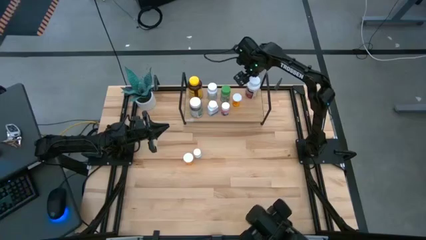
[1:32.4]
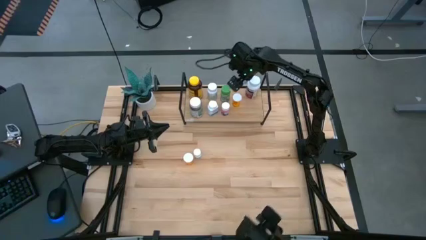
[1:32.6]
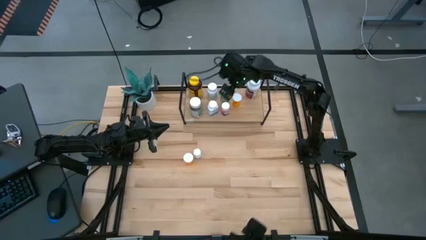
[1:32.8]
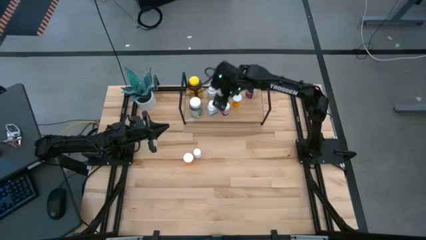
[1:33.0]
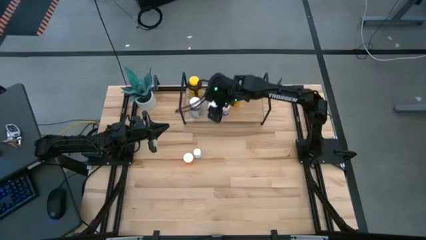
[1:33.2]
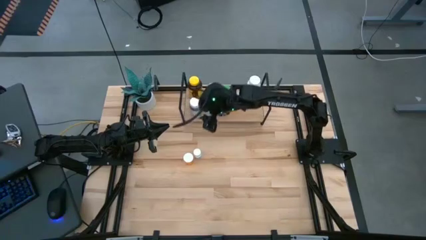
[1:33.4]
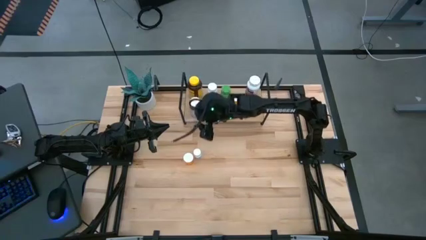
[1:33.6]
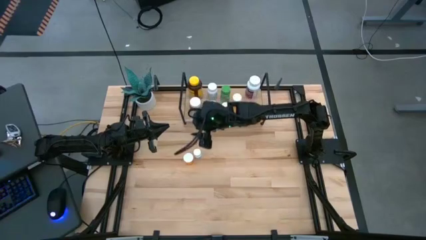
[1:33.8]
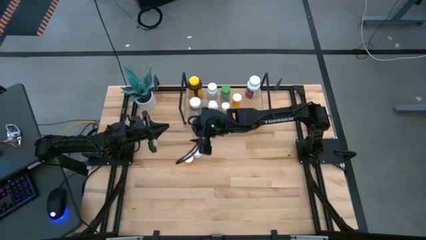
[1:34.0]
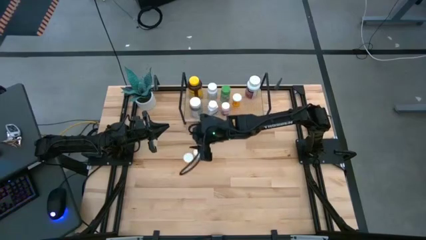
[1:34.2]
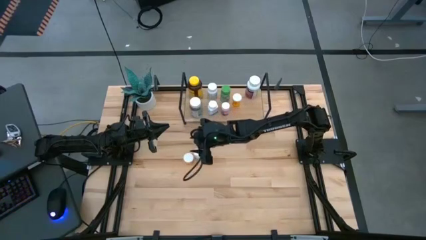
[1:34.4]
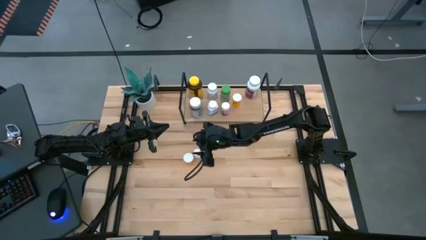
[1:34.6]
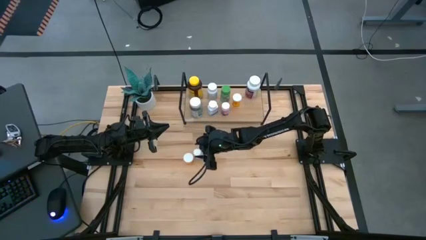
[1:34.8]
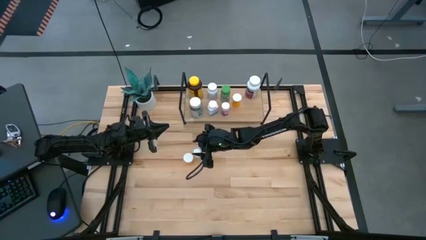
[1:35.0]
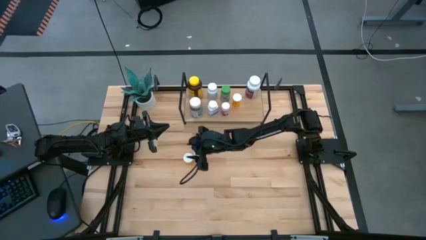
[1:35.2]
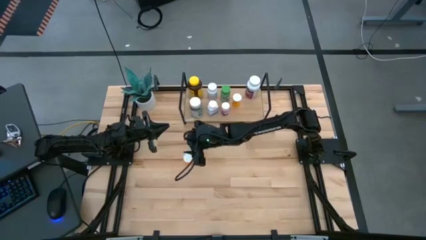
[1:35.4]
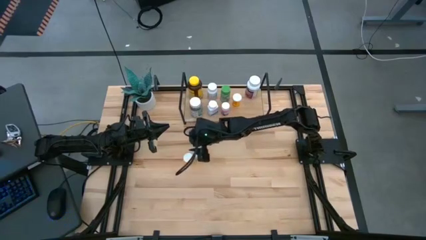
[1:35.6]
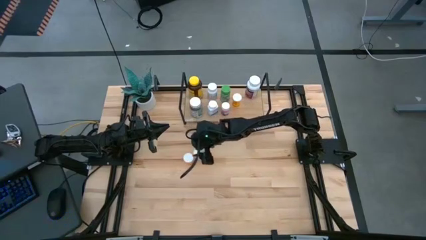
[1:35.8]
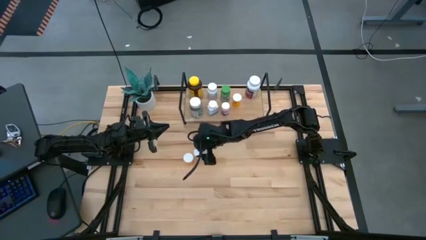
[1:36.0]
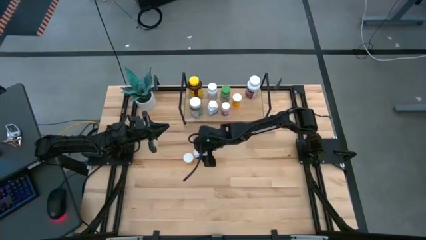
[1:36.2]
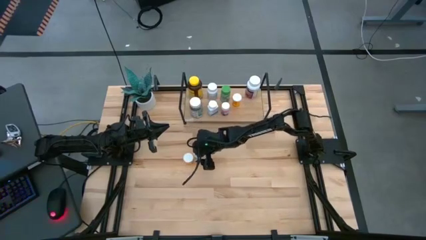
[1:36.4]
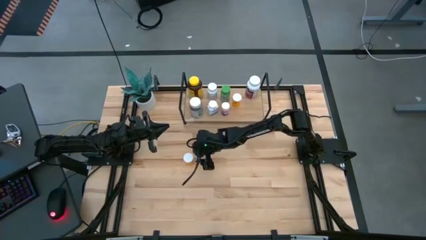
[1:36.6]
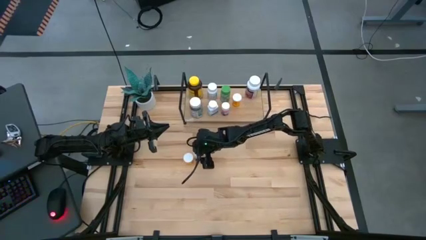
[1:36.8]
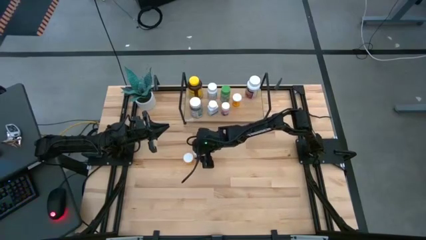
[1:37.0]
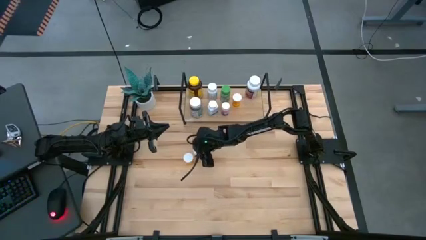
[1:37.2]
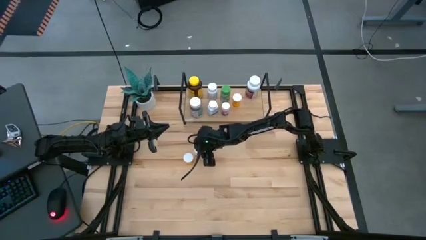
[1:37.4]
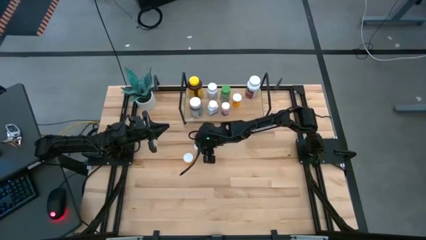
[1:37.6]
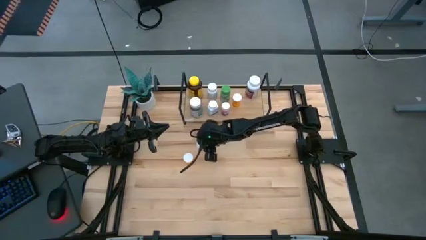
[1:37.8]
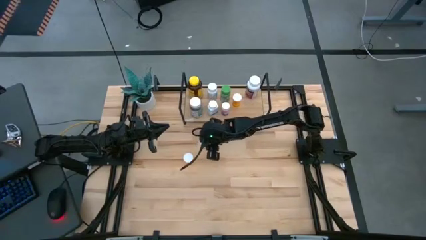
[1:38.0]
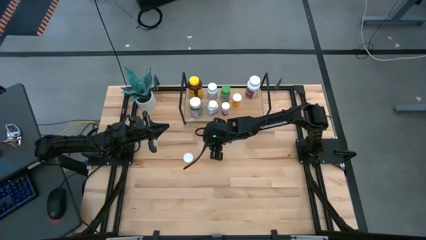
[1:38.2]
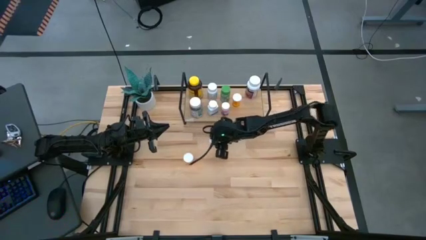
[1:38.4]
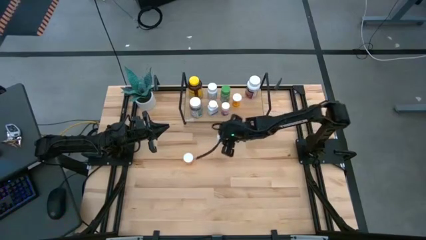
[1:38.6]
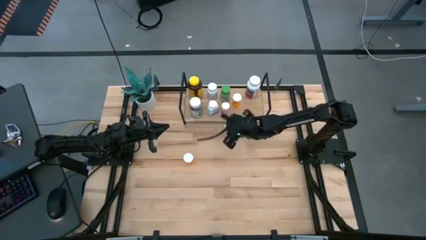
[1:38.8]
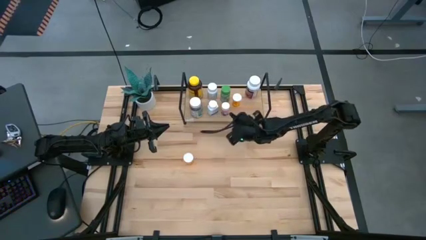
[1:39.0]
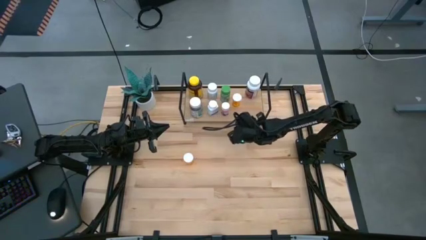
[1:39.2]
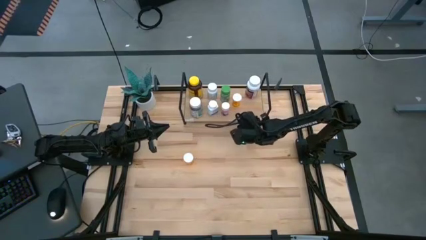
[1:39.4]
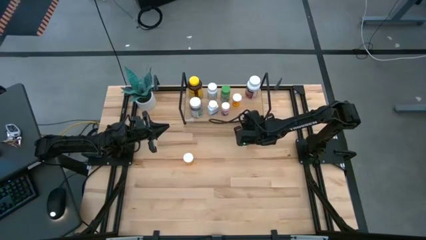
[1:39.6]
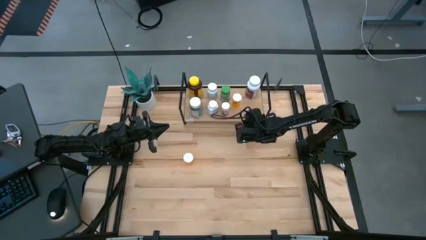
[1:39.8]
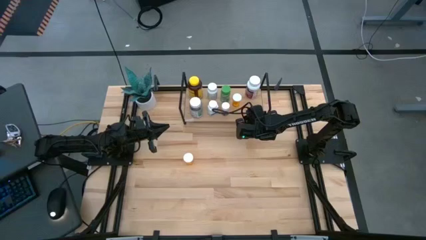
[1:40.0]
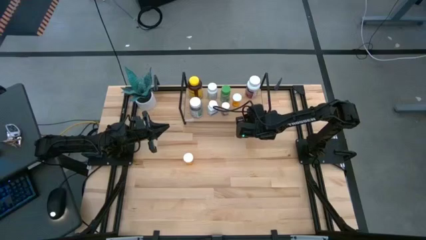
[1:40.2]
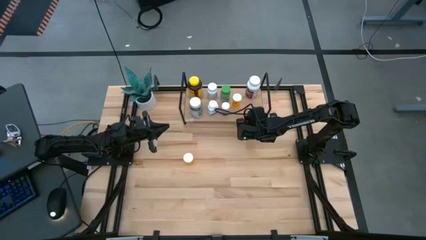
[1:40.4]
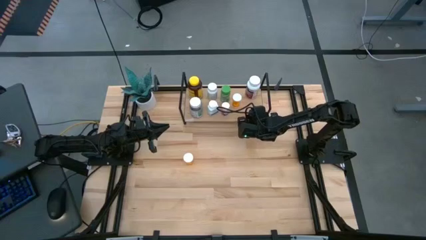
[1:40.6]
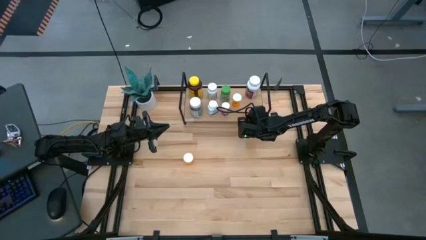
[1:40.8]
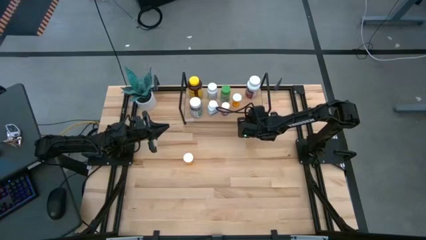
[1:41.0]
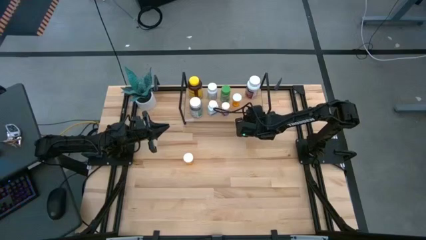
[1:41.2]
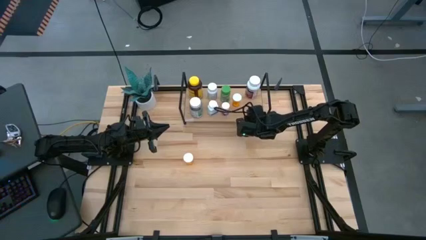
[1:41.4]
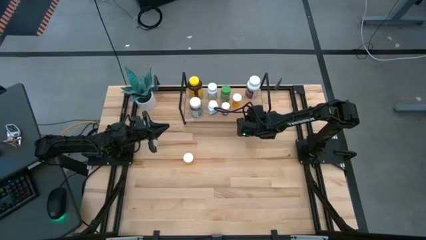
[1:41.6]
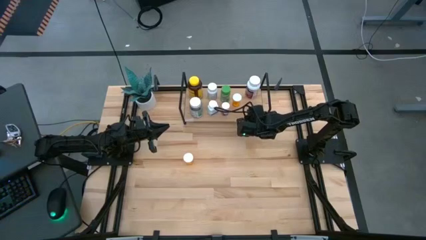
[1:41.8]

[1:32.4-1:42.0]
Task: Pick and place medicine bottles onto shelf by color
Put the white medicine bottle on the shelf

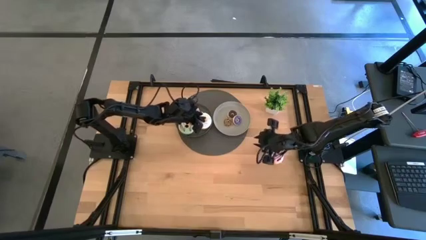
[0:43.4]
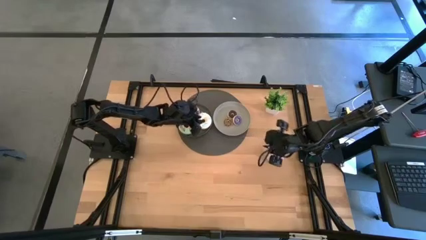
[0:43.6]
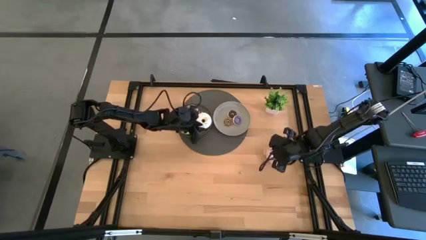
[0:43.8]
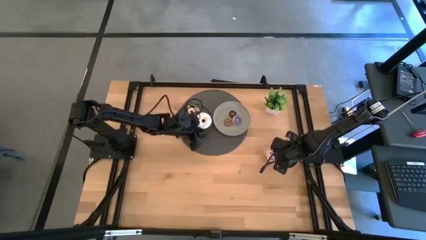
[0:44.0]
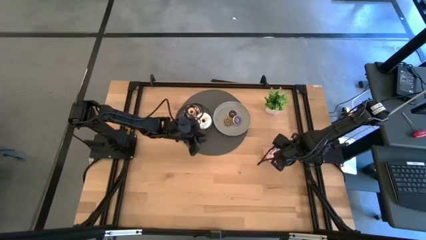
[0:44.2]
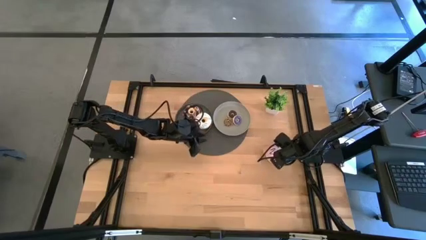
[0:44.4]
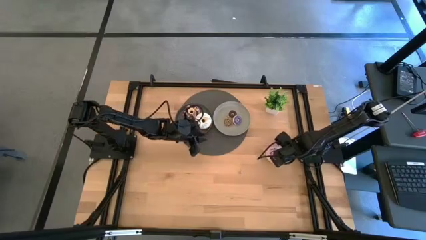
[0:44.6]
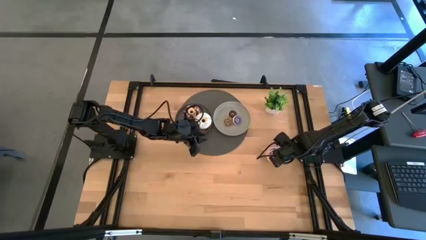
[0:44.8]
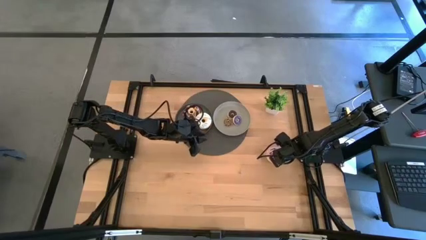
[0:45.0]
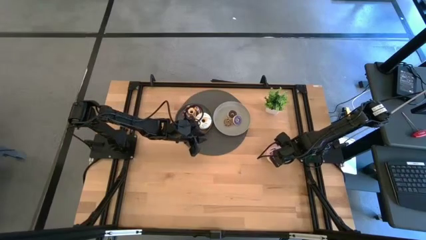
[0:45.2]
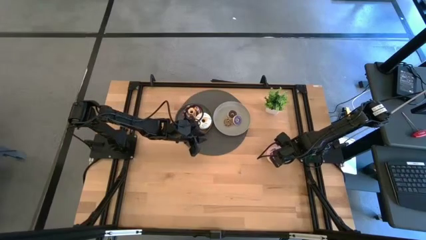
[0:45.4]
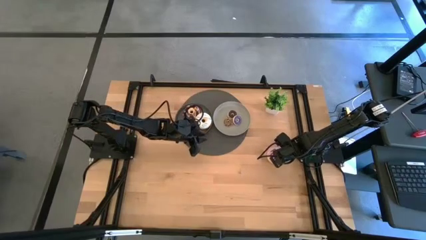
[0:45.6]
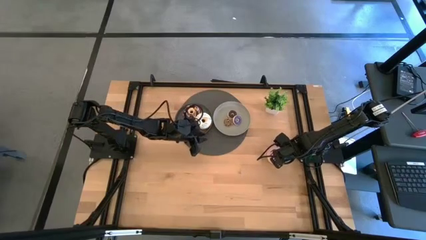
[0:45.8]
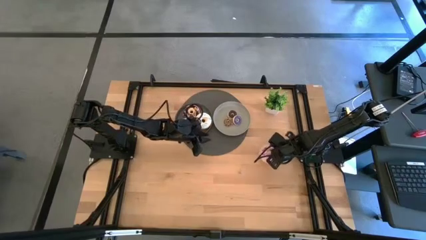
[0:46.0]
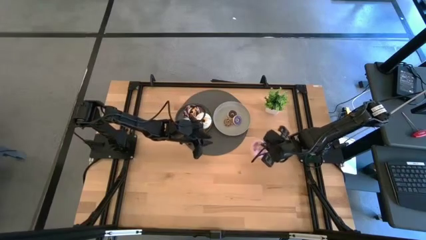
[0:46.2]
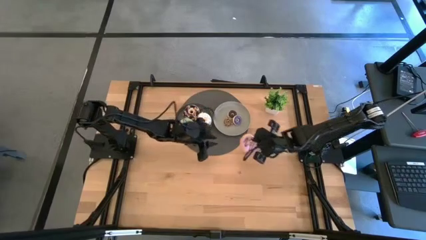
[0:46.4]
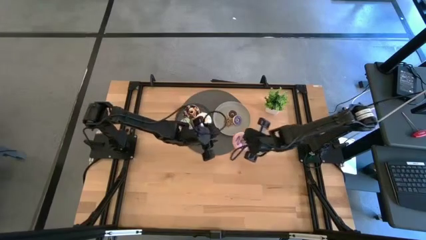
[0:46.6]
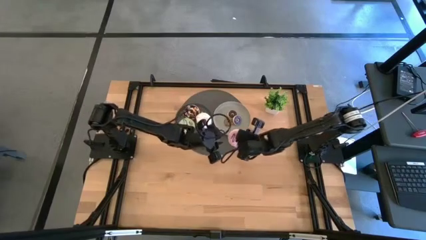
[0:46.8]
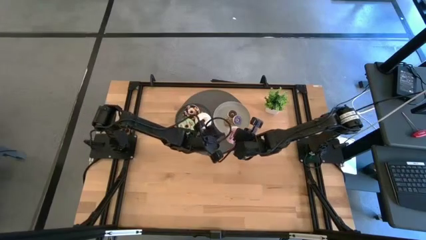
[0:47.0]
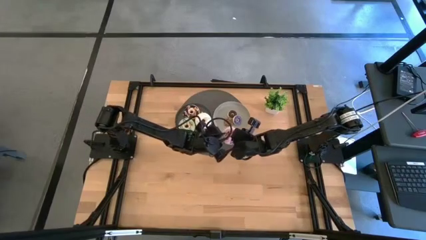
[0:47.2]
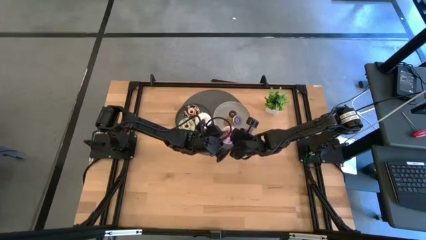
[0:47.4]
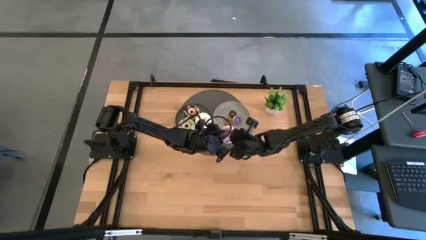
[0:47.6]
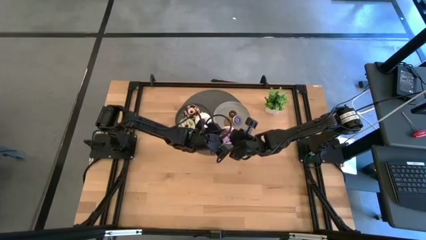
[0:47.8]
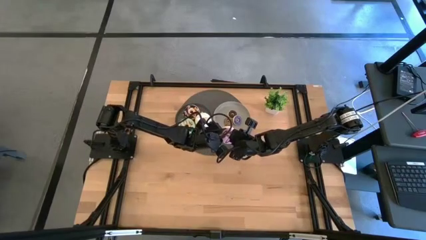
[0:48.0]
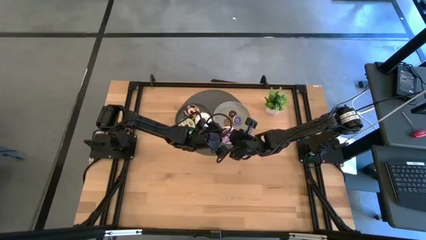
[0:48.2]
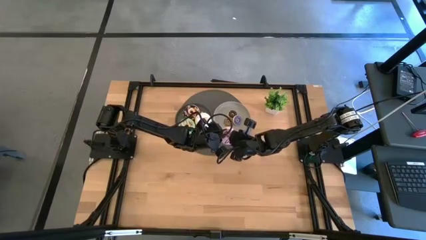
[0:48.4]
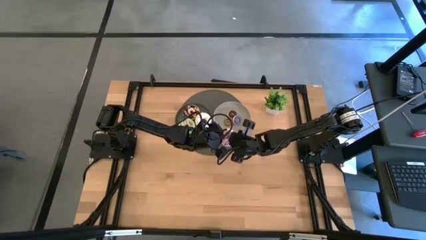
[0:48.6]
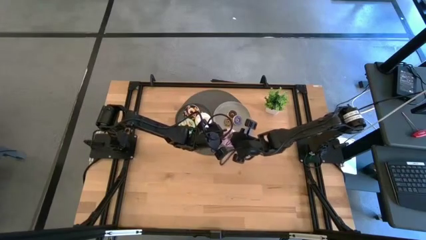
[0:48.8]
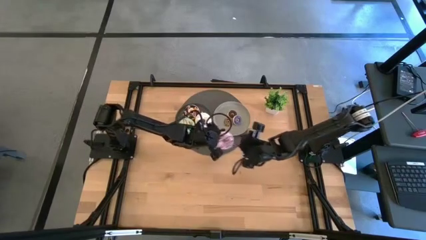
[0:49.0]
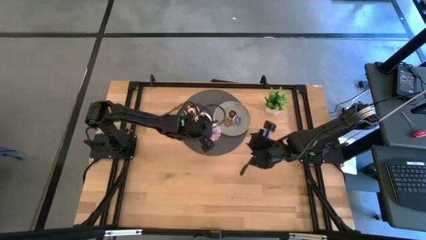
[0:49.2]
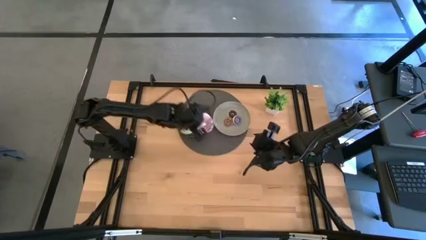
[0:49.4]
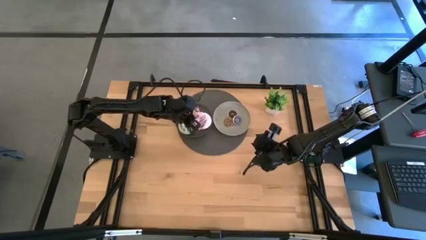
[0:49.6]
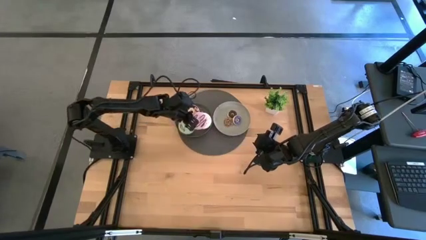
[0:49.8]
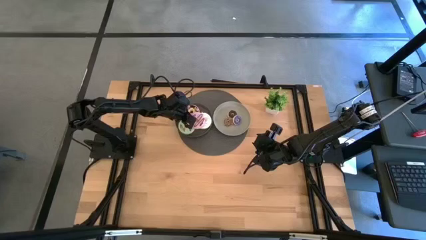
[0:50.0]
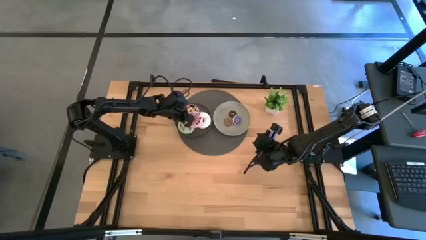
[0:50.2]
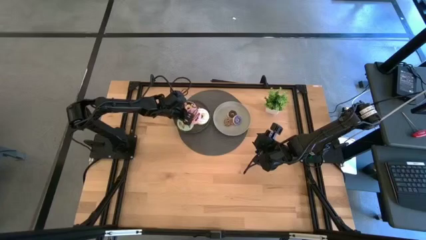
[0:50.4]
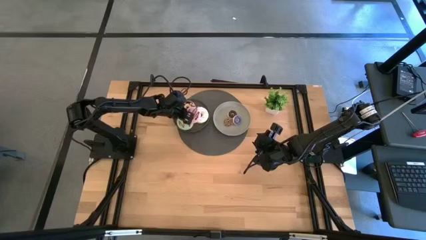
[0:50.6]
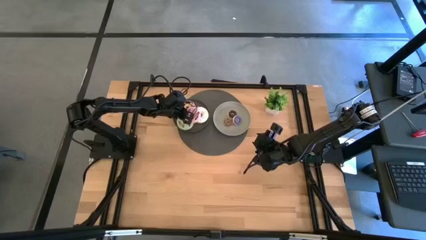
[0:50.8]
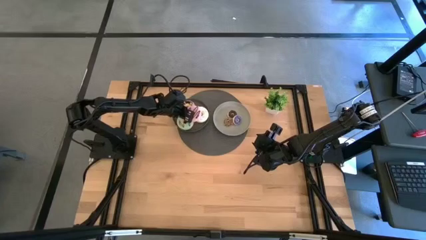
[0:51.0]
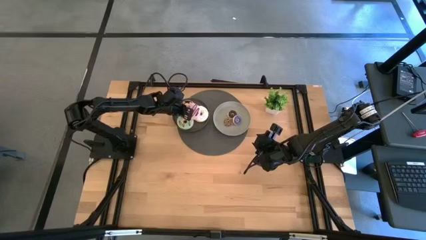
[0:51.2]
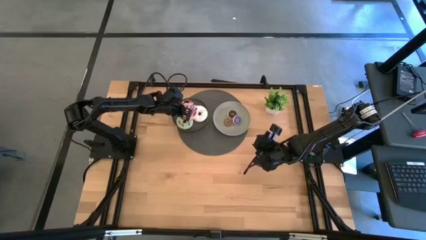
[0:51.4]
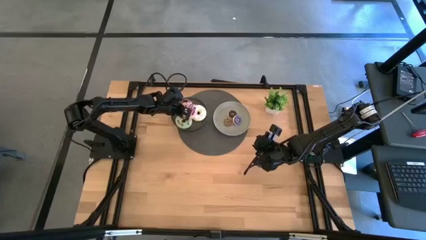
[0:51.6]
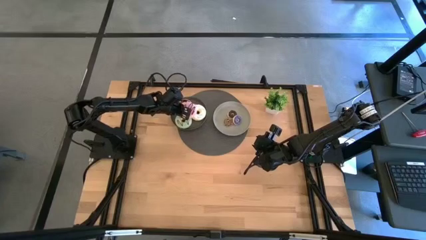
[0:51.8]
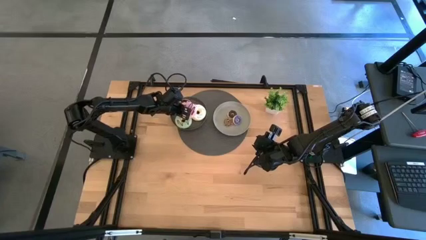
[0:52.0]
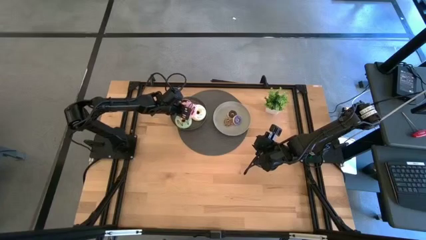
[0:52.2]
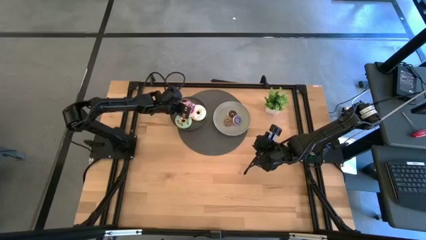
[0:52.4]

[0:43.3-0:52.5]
Task: Pick & Place donuts
Put the big pink doughnut on the dark gray plate
